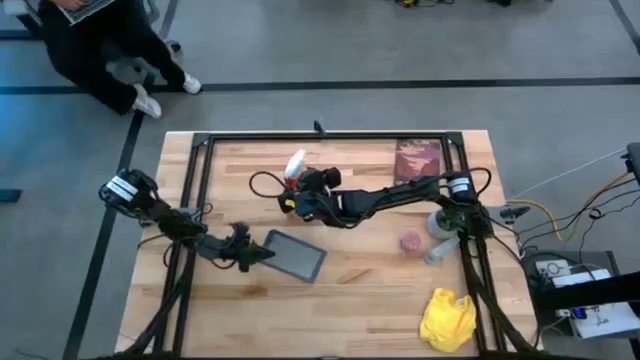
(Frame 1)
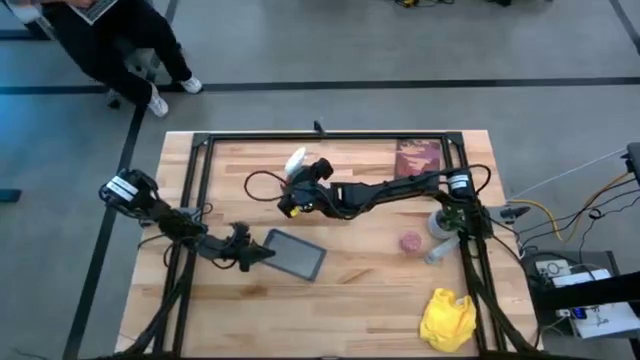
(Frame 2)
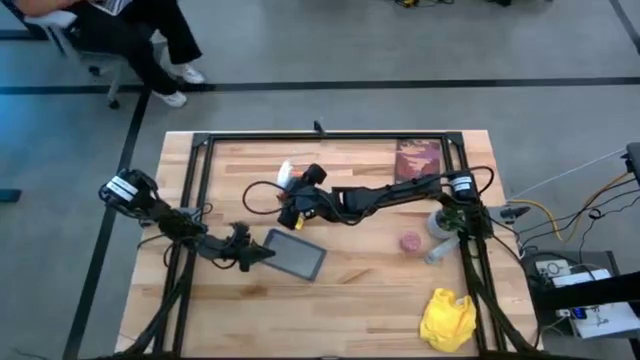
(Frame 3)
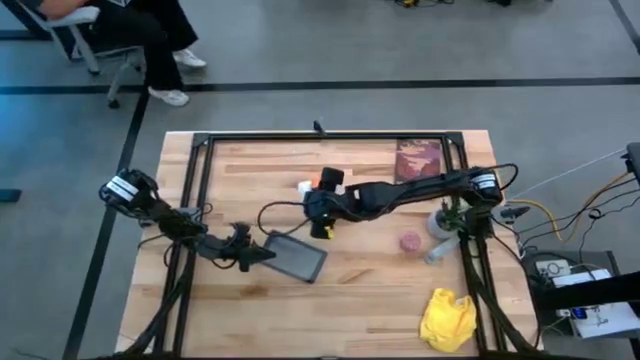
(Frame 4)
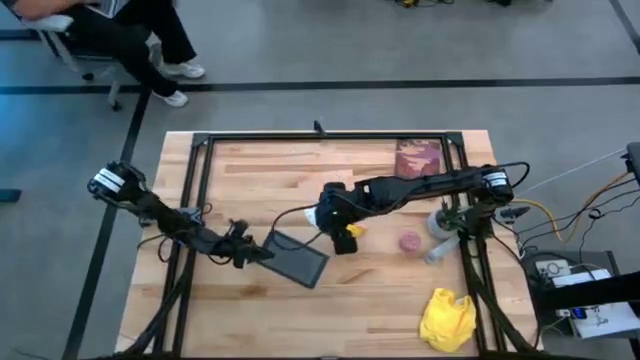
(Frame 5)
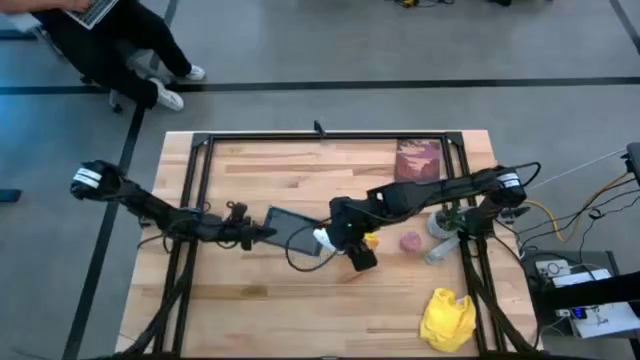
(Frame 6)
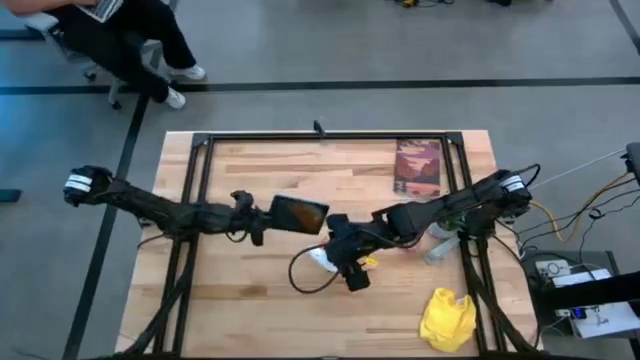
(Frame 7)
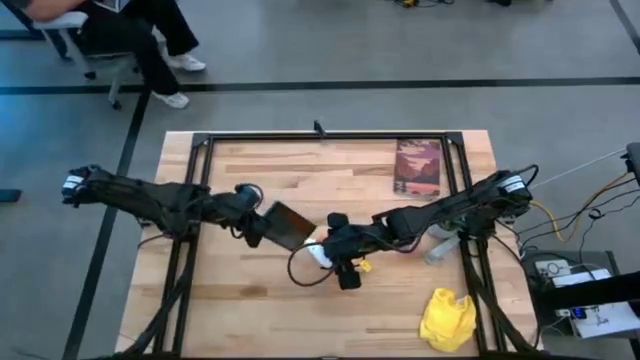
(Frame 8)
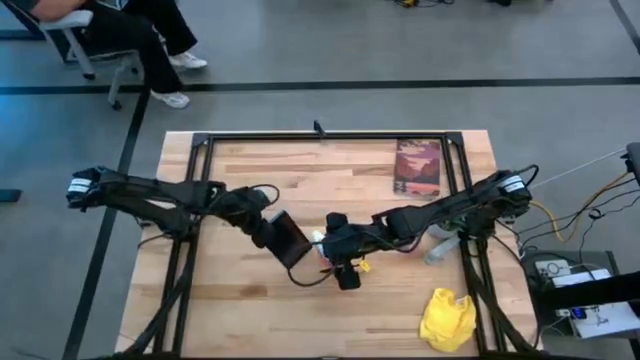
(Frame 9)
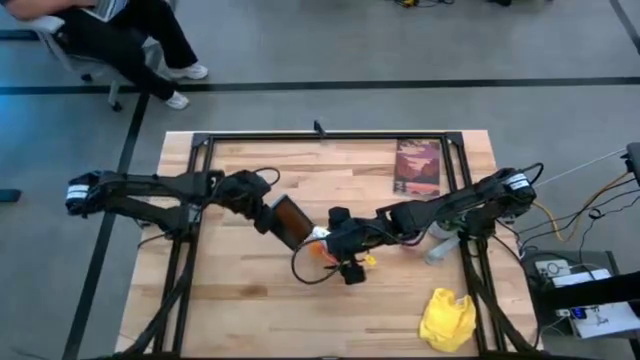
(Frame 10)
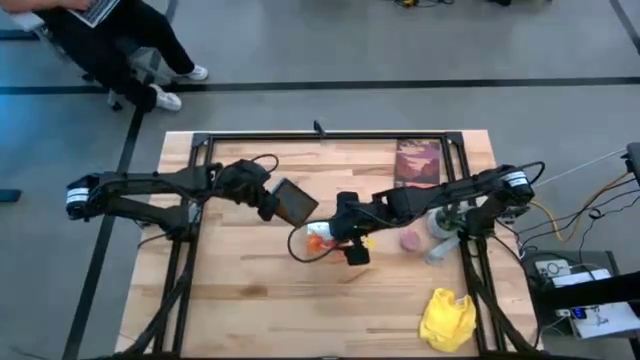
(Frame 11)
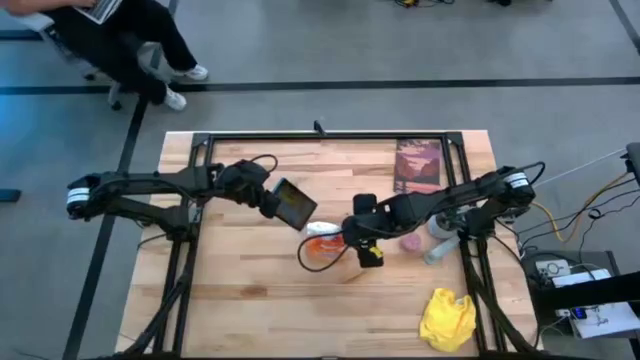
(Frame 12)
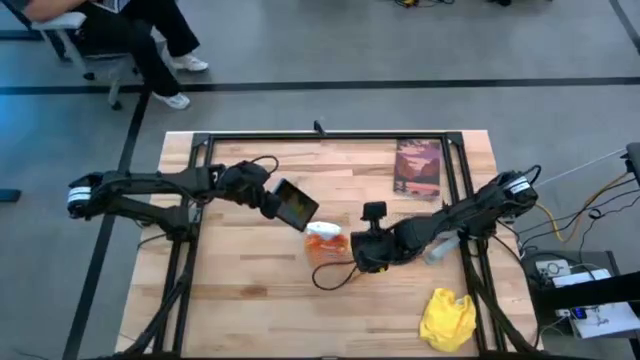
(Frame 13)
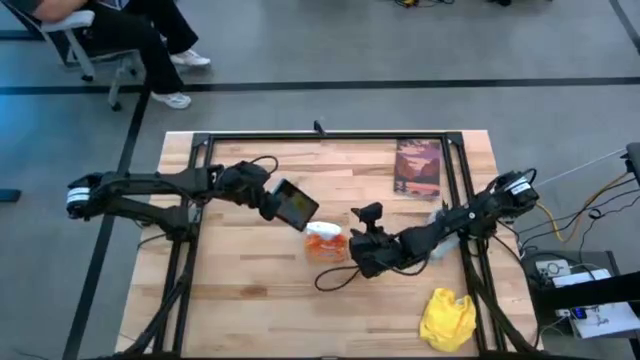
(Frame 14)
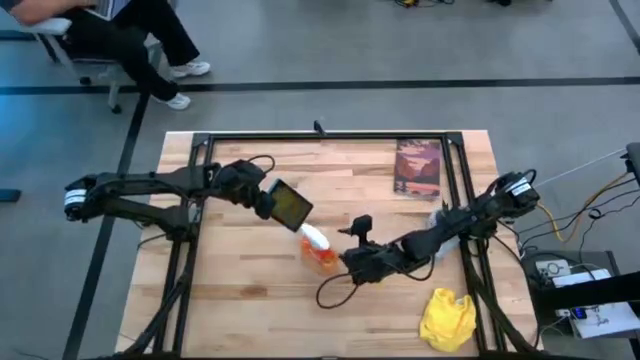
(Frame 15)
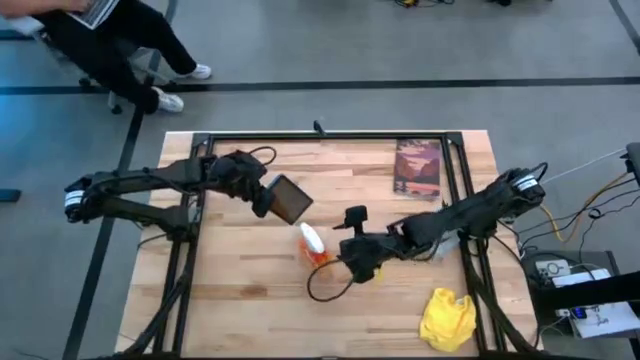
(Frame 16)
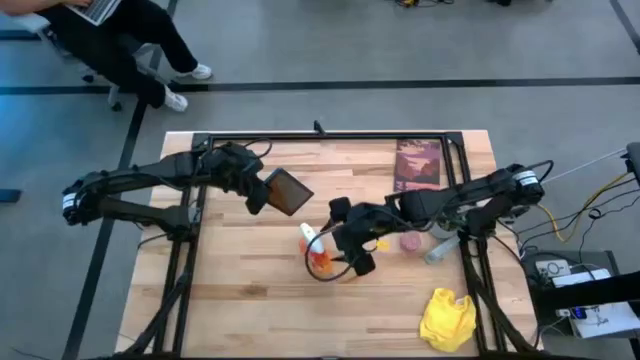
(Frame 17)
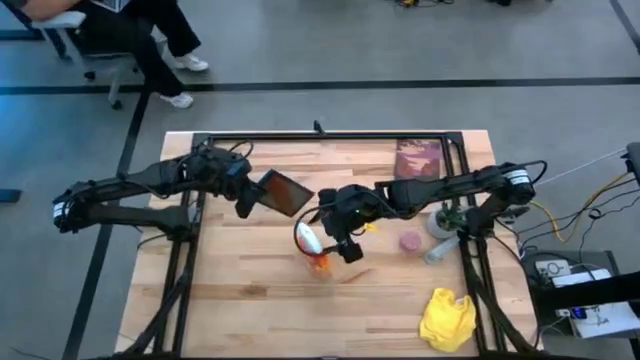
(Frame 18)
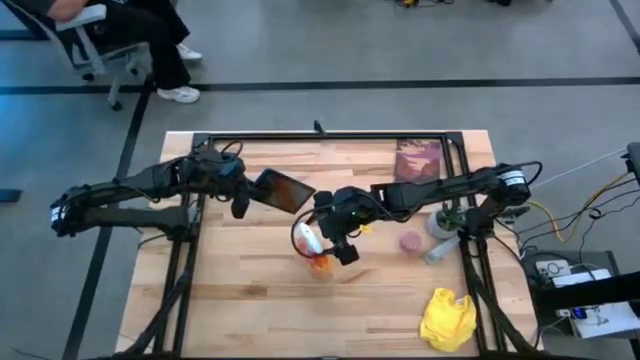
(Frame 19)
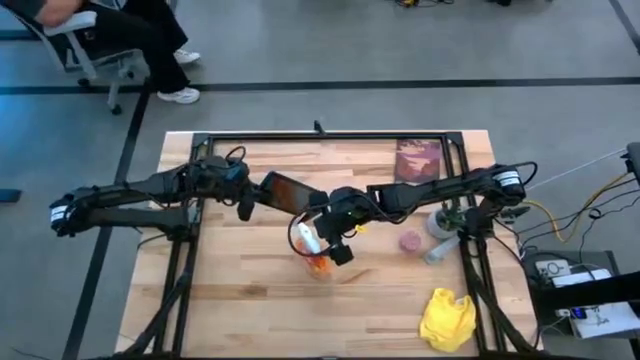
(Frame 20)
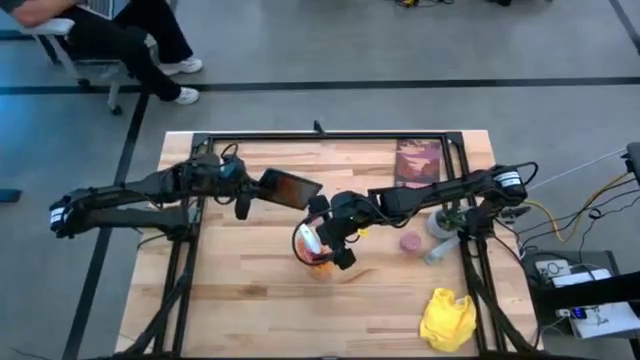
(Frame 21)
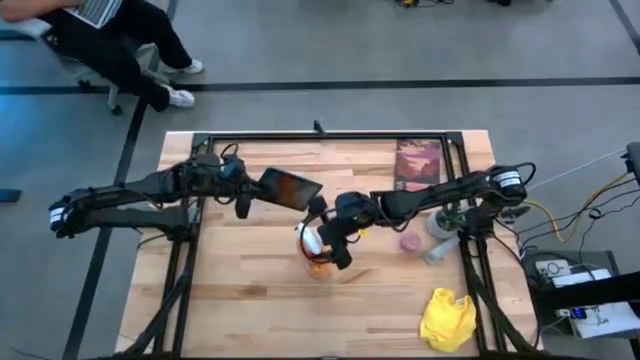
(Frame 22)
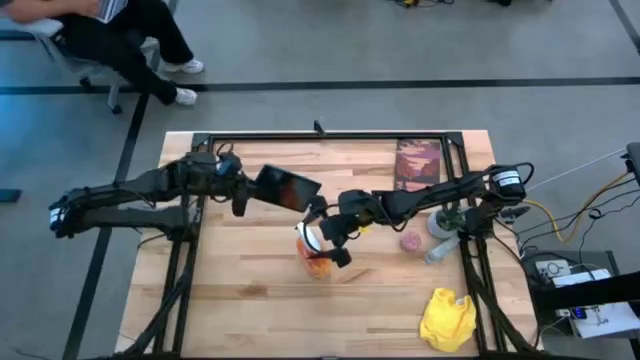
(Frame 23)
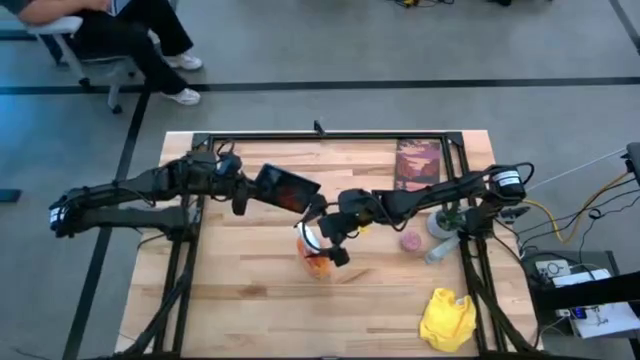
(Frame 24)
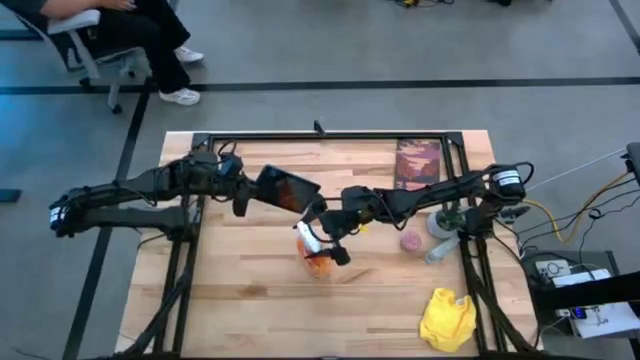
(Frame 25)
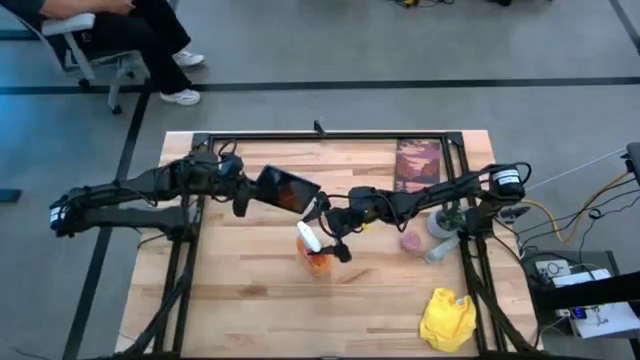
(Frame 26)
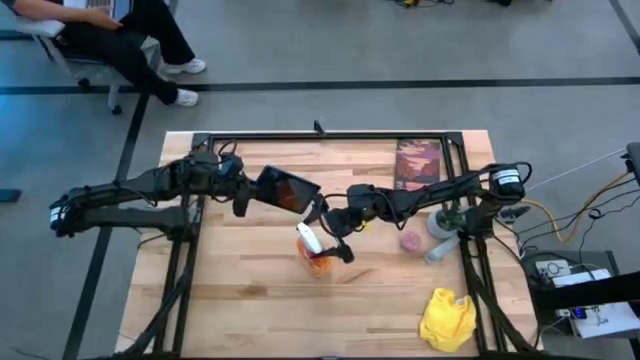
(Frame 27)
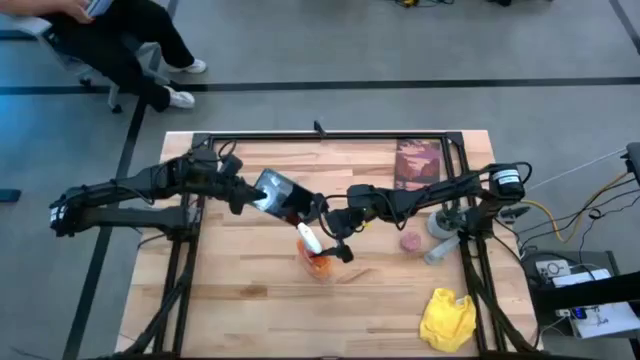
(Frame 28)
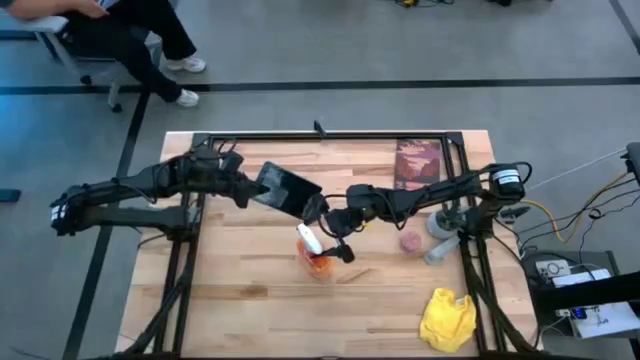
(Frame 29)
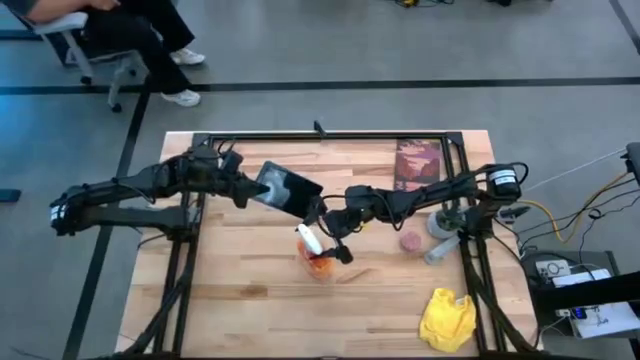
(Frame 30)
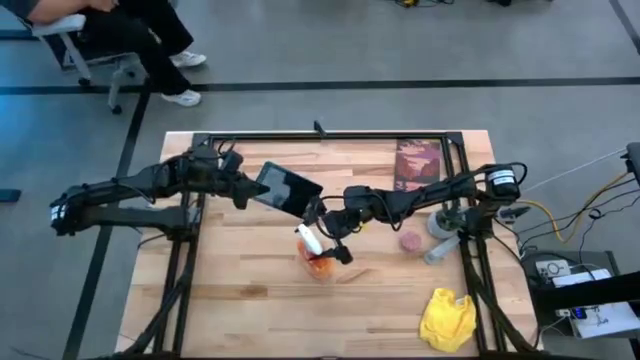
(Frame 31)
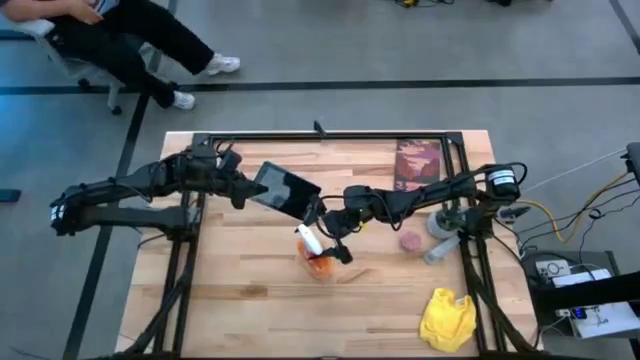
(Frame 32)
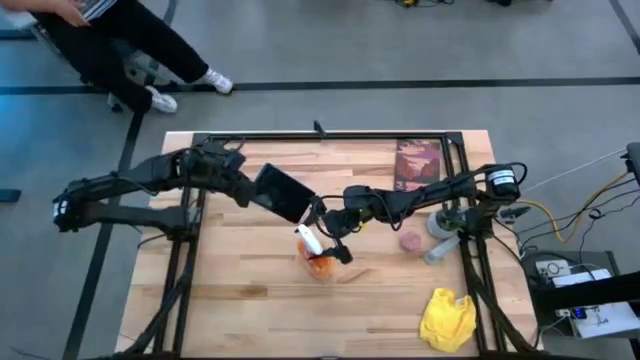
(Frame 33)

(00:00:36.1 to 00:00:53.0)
Task: Apply microfiber cloth
Spray the front and back of the tablet with the spray cleaning bottle

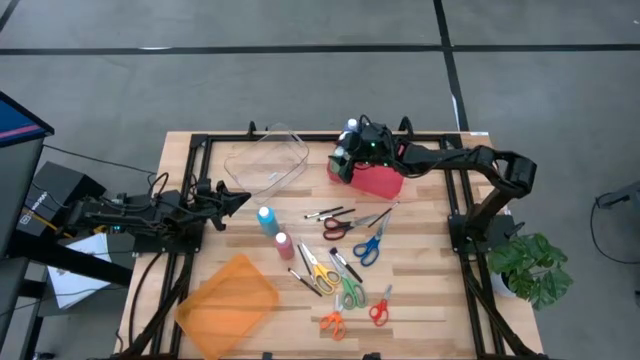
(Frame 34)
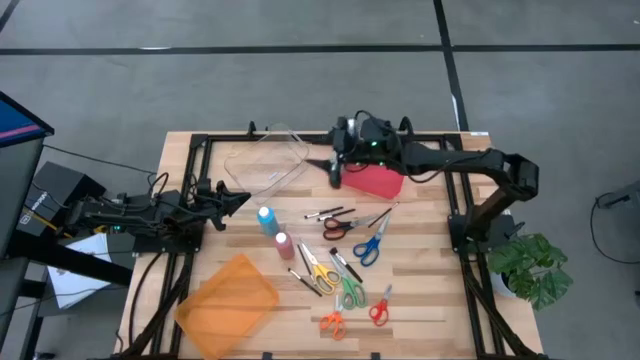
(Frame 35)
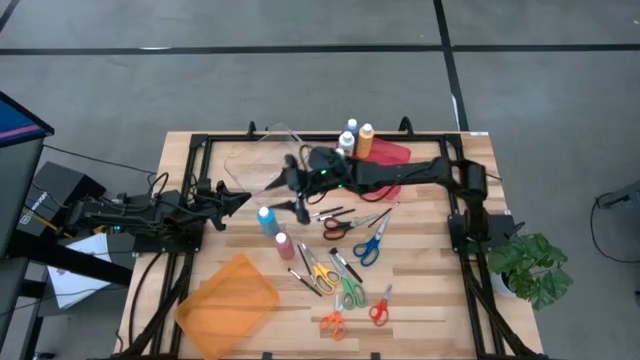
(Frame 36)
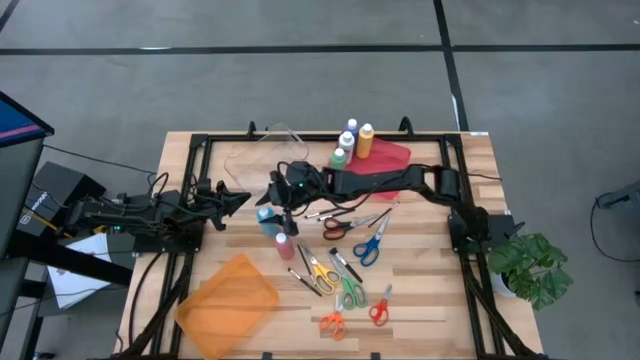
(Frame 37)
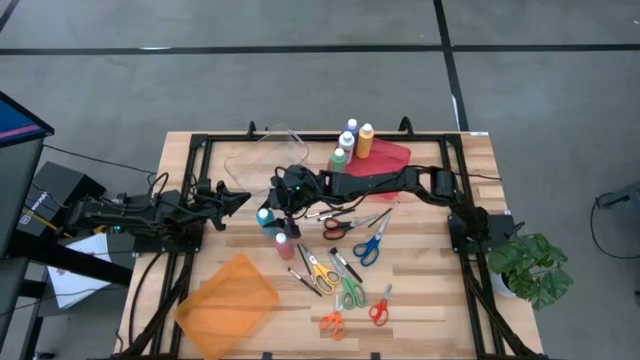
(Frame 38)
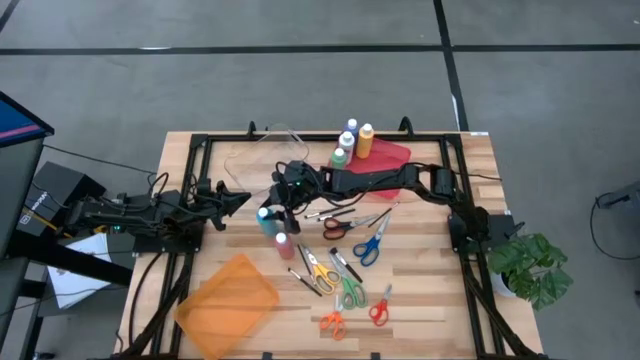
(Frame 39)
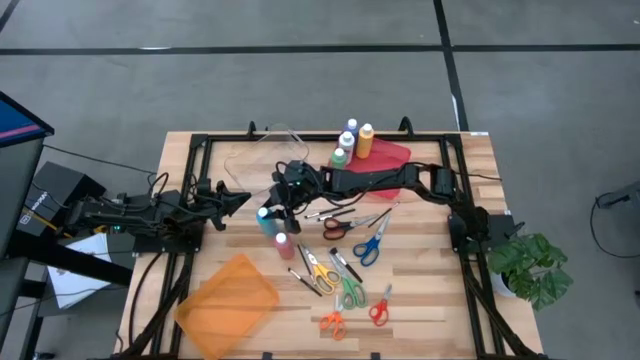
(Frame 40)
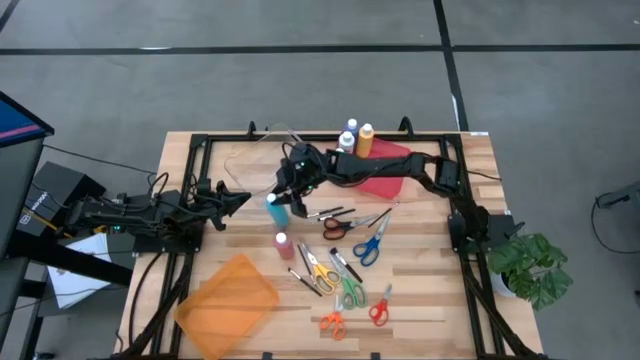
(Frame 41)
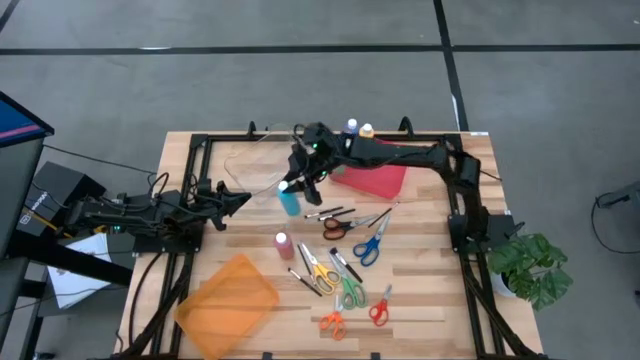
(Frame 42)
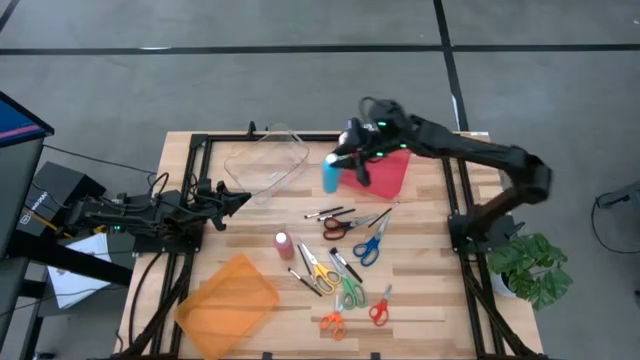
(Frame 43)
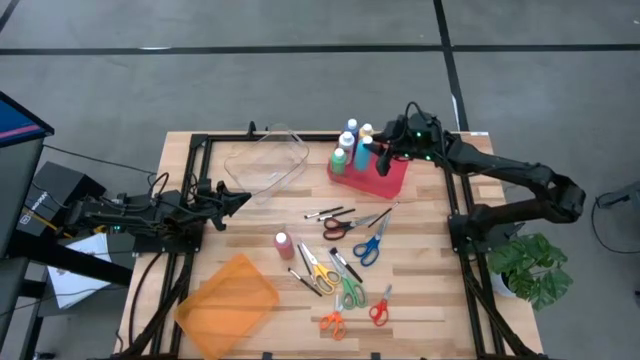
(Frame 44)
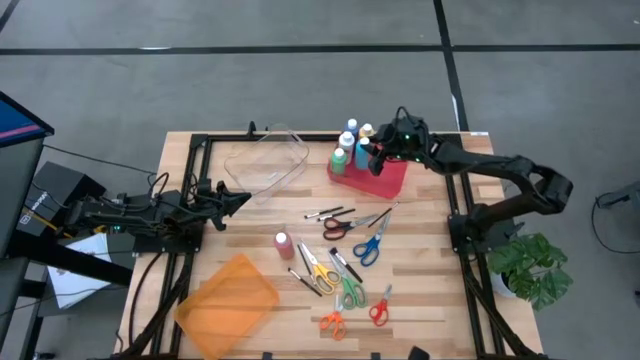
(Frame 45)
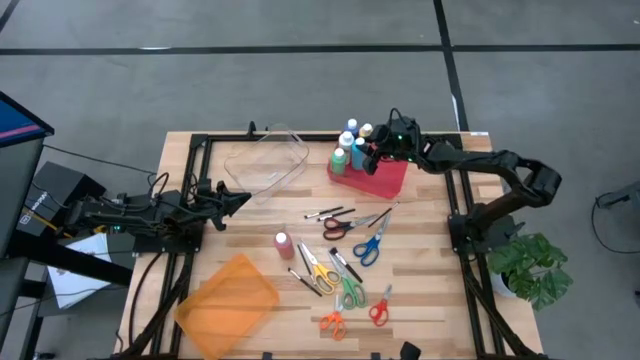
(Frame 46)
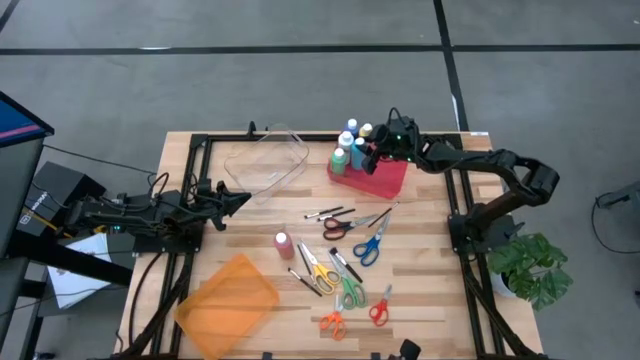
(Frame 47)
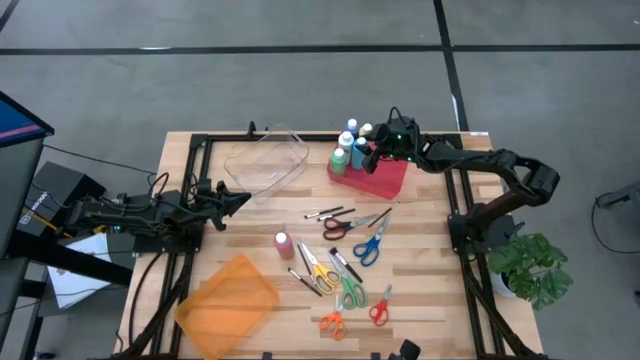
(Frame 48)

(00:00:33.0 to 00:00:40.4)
Task: Pick & Place Paint Supplies
Put the light blue paint bottle into the red bin
